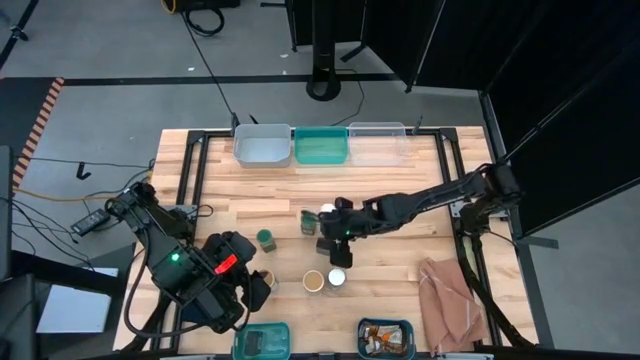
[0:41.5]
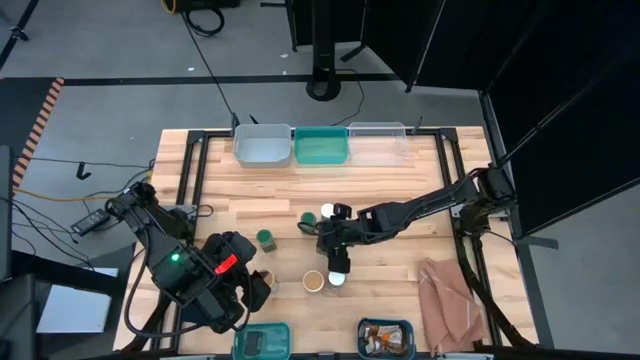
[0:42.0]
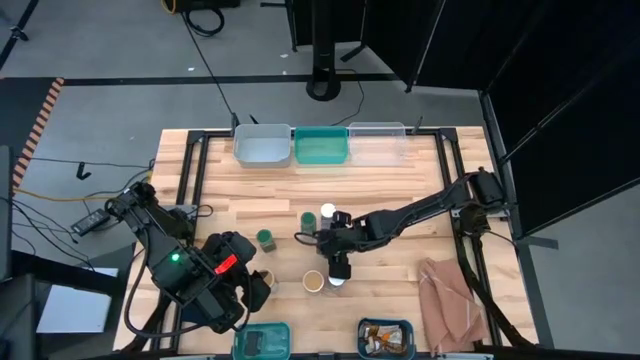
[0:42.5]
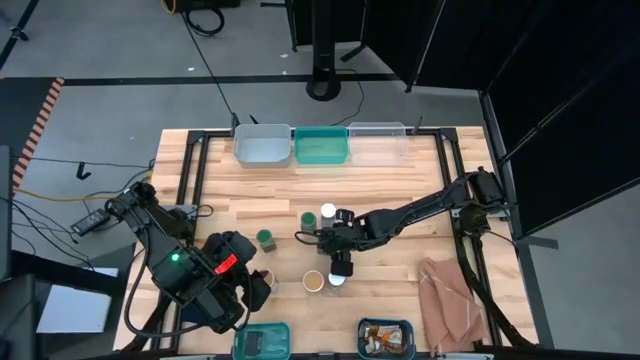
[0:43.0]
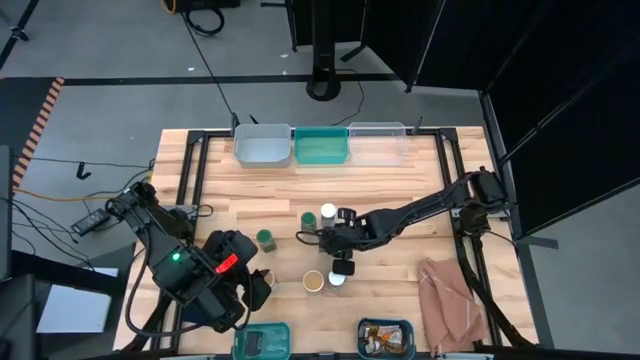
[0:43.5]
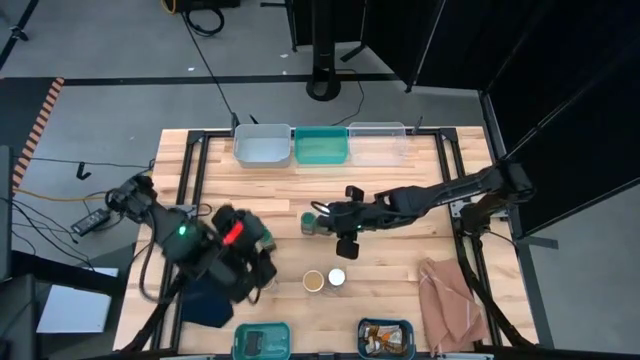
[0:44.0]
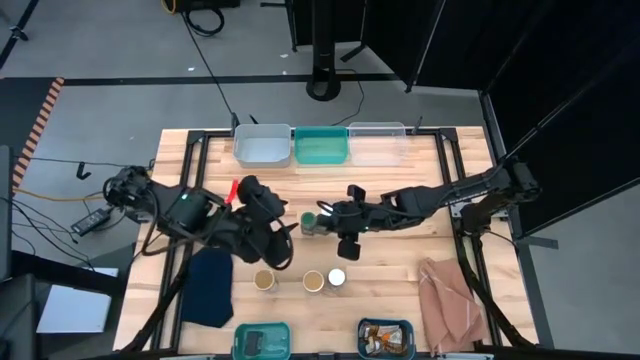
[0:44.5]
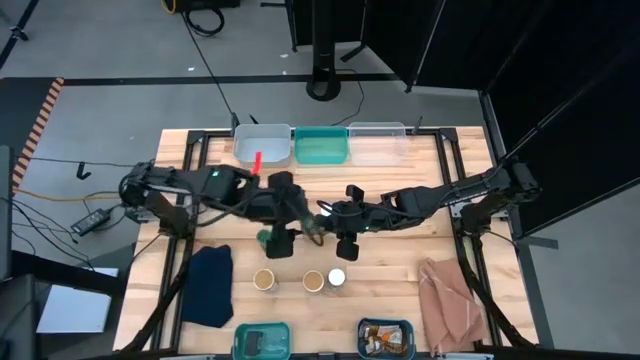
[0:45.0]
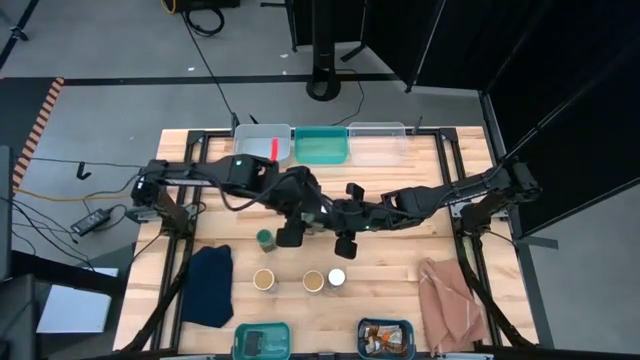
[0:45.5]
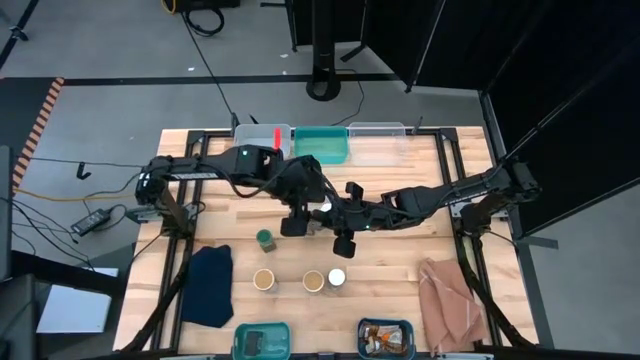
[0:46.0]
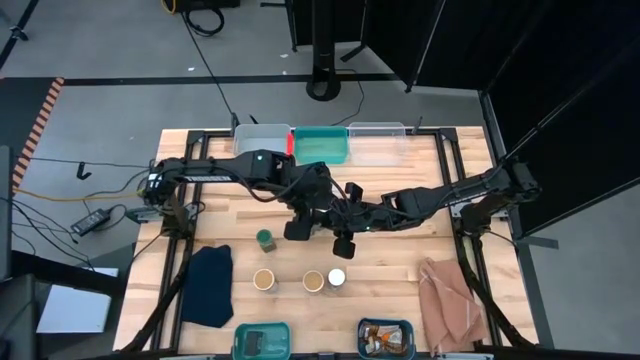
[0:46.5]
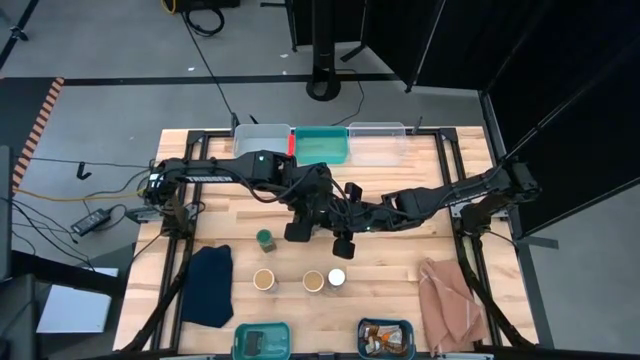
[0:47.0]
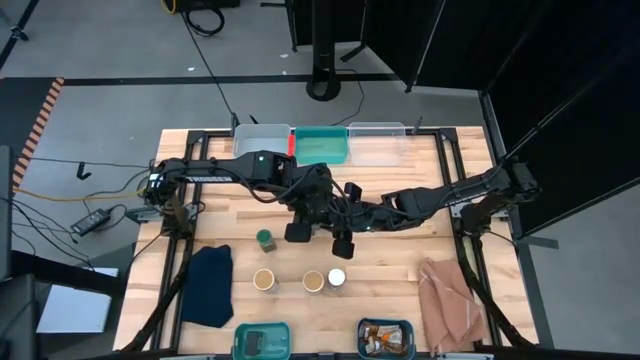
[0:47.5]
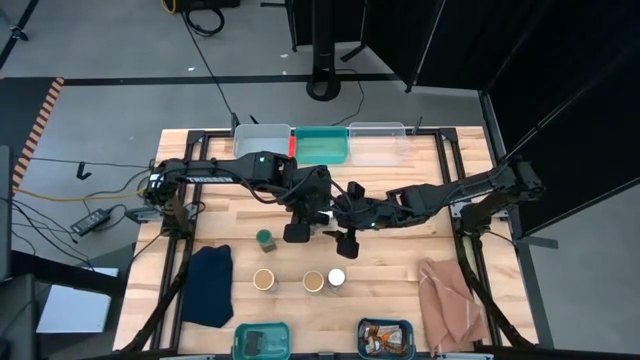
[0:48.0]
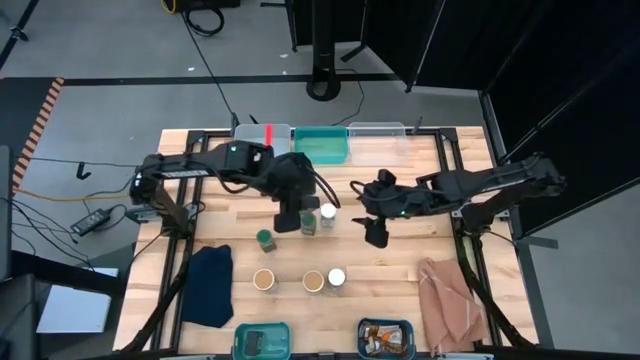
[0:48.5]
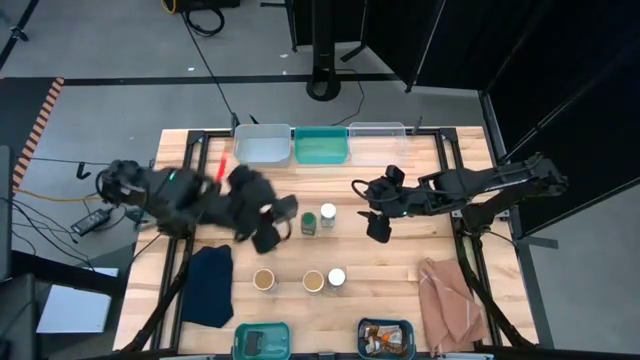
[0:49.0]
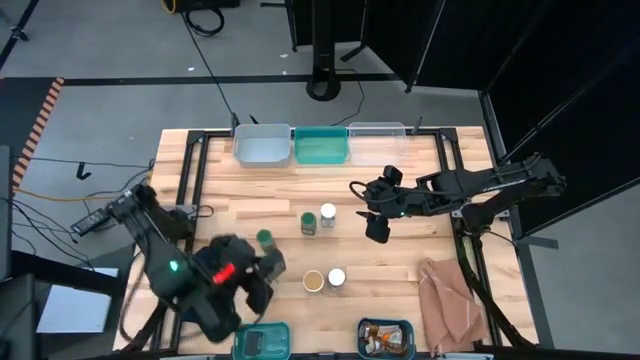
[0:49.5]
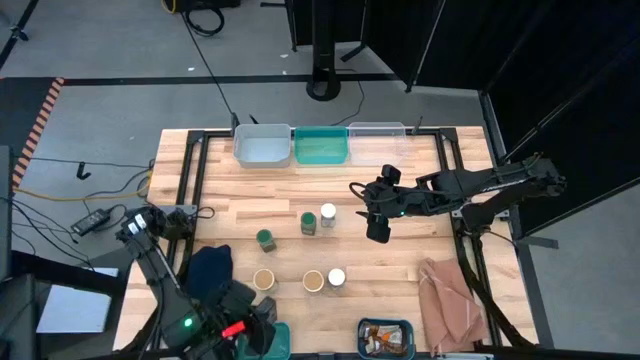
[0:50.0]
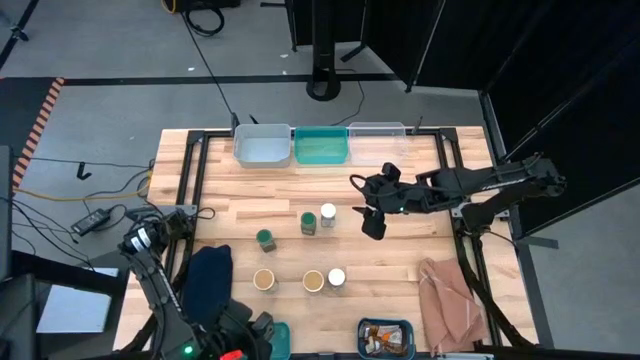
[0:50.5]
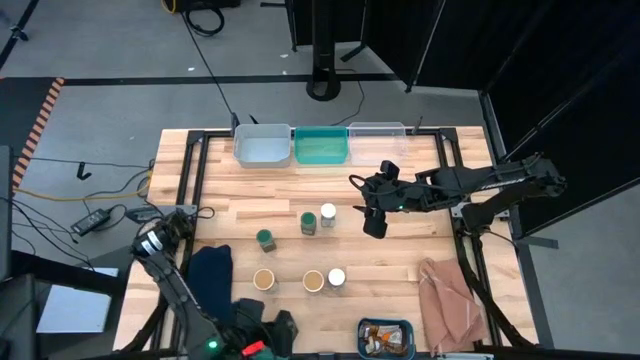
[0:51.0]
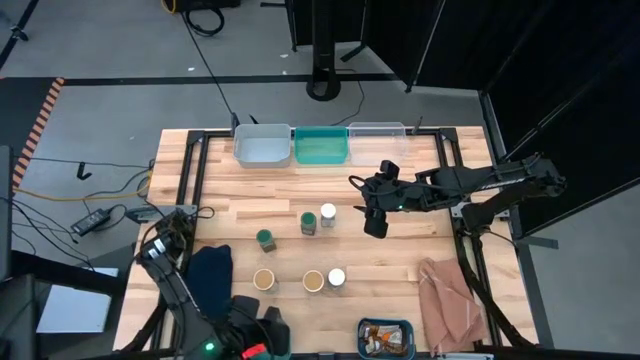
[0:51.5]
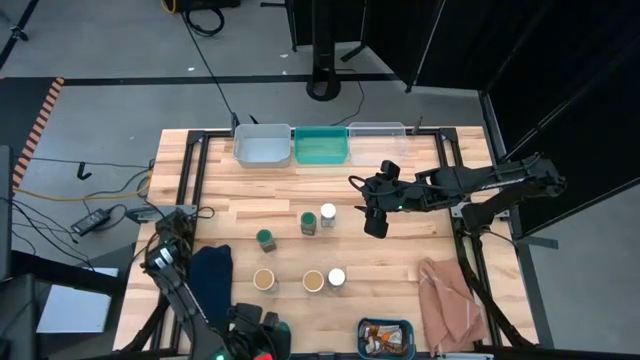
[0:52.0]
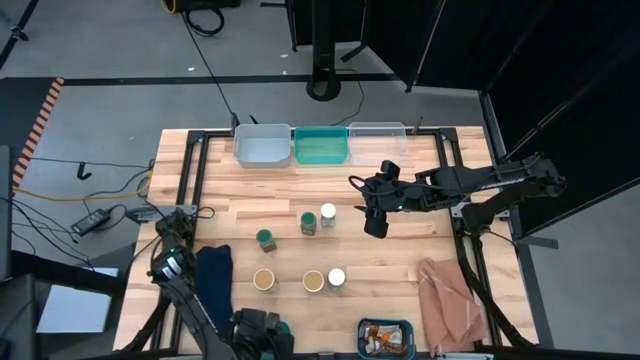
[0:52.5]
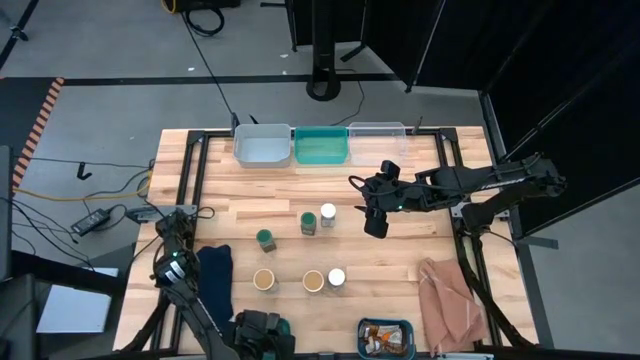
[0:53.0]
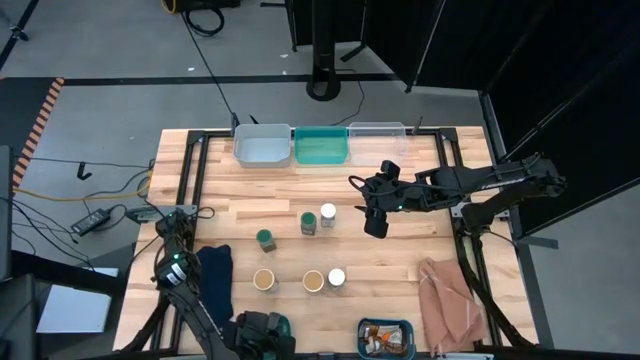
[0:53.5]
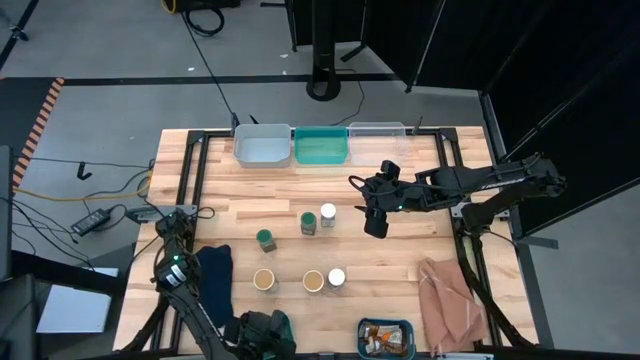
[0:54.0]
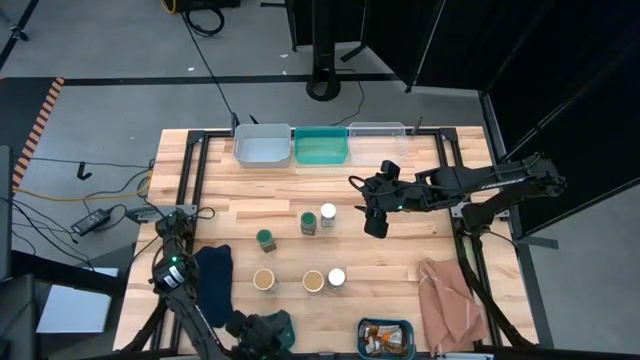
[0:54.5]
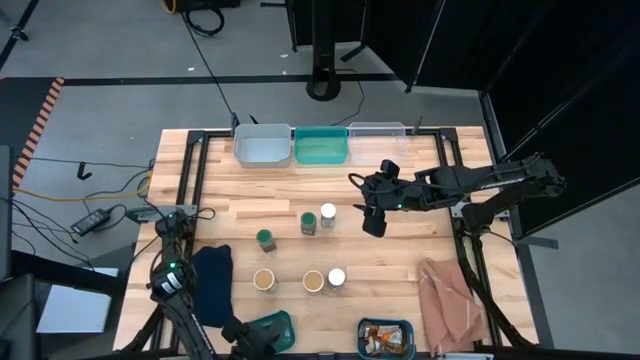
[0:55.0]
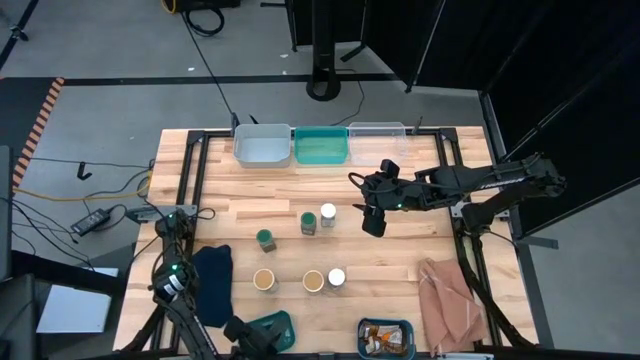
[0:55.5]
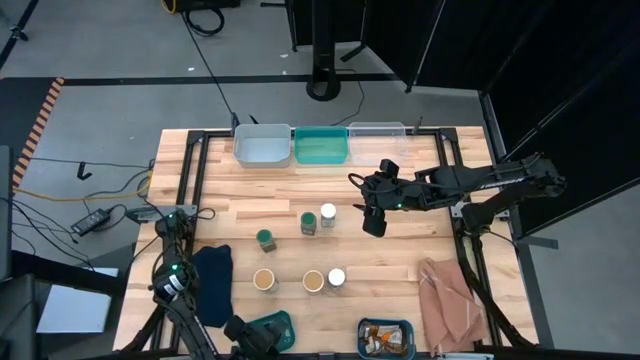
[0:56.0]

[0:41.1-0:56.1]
Task: Sort spices by type
Put the black seasoning can into the dark green bin

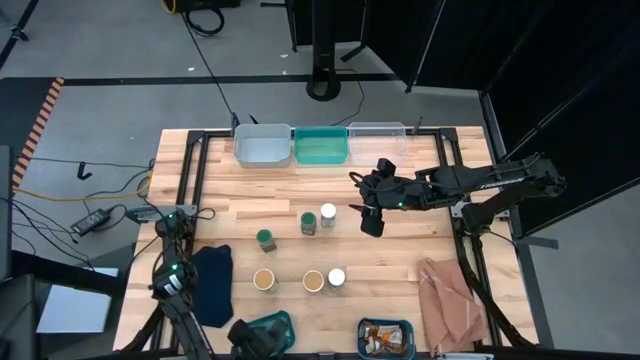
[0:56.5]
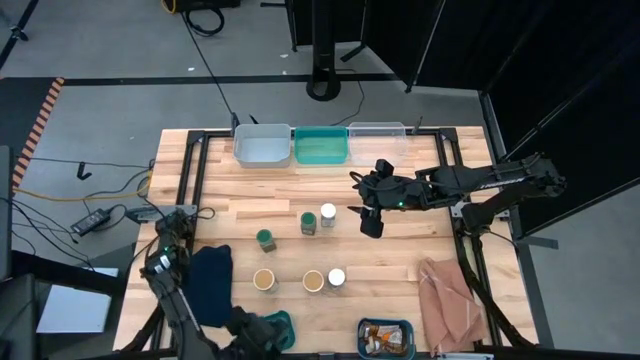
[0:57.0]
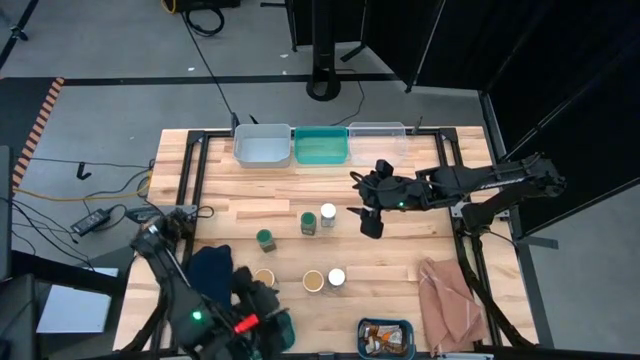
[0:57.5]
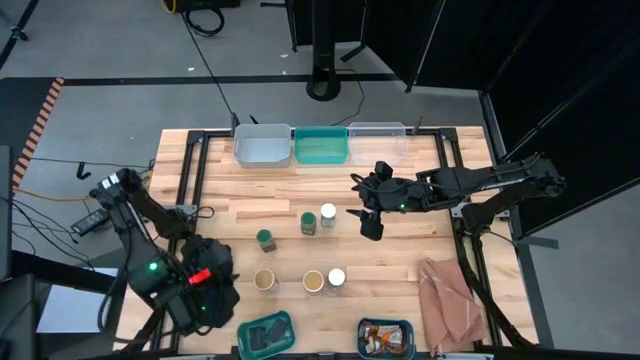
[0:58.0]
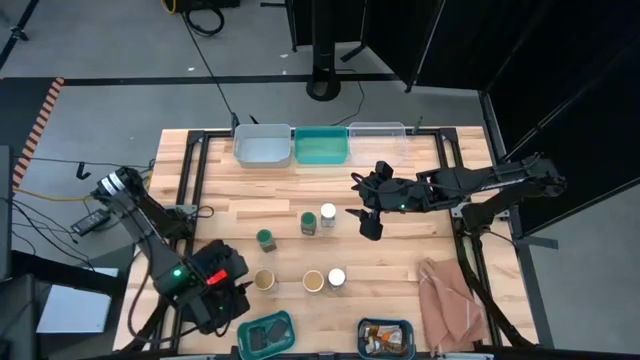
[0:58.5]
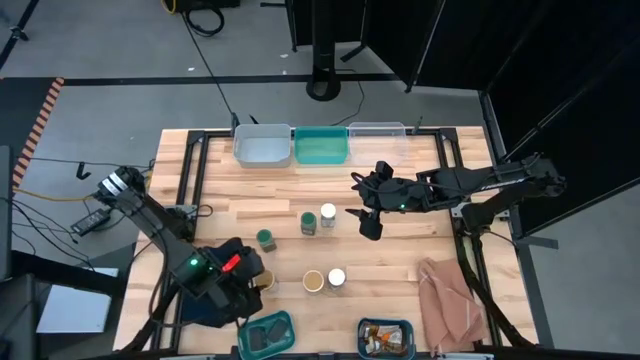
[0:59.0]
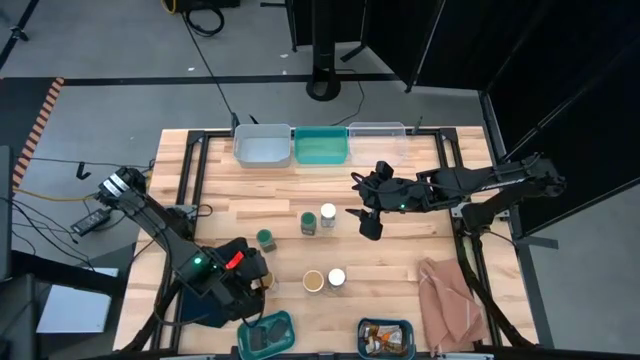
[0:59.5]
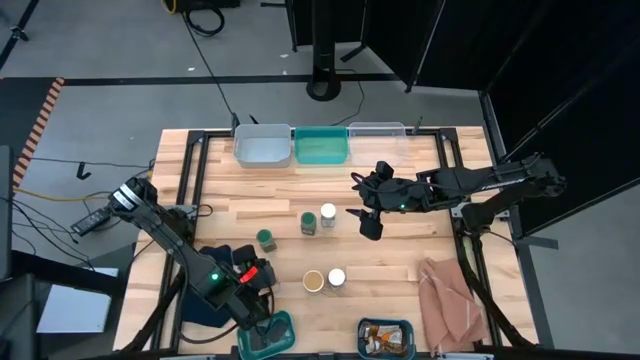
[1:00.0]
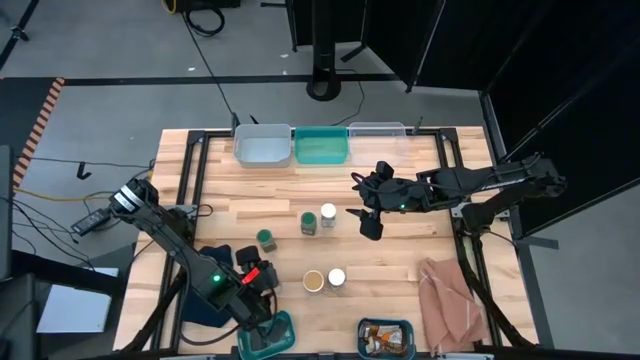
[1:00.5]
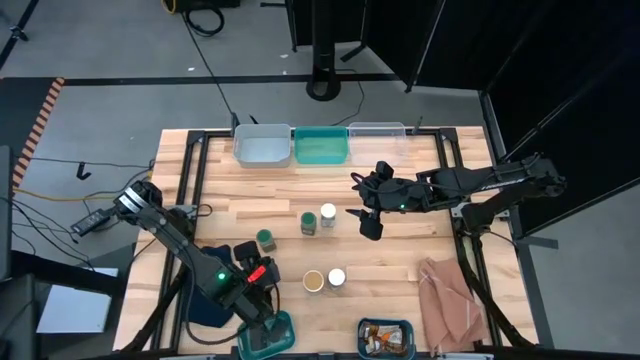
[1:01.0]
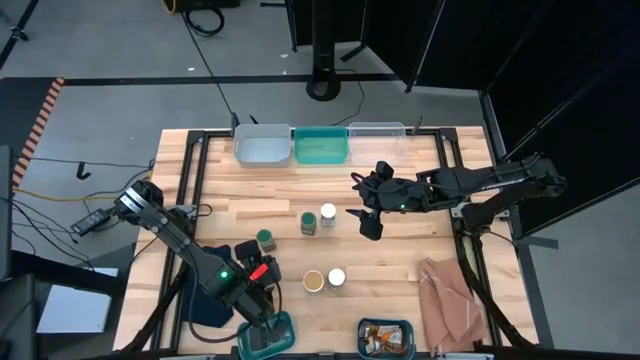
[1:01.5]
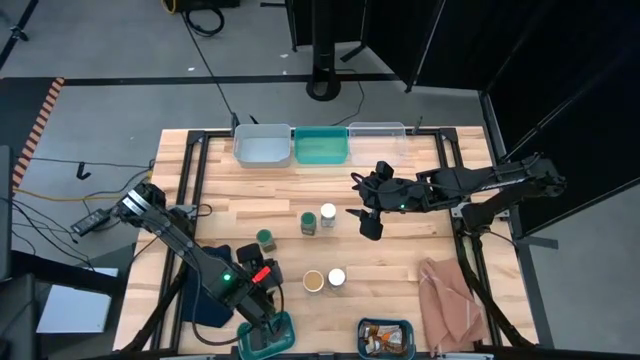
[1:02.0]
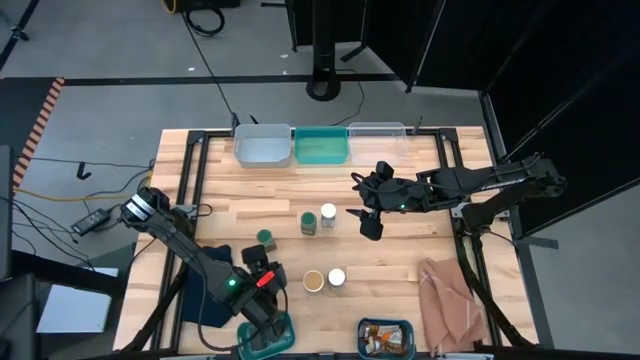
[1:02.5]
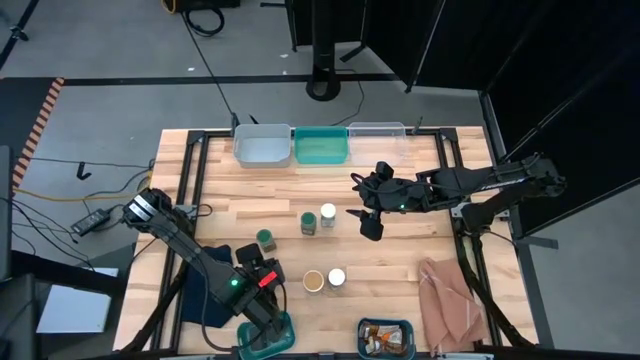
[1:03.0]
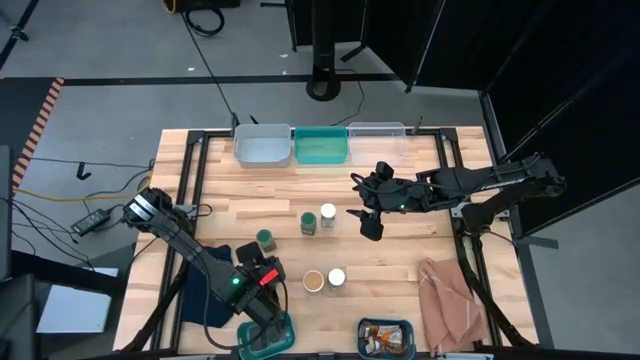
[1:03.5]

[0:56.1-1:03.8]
Put the left gold seasoning bottle into the gray bin
